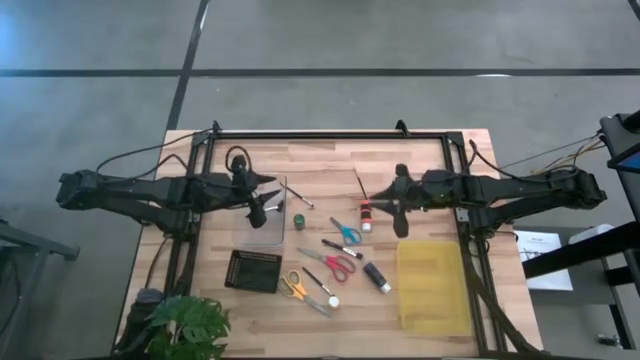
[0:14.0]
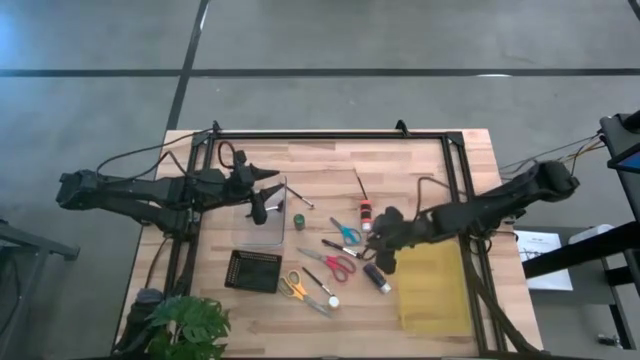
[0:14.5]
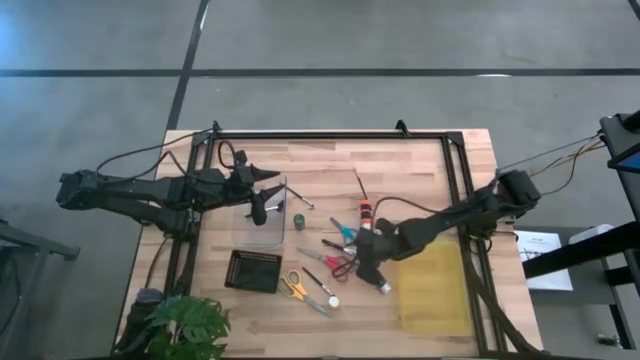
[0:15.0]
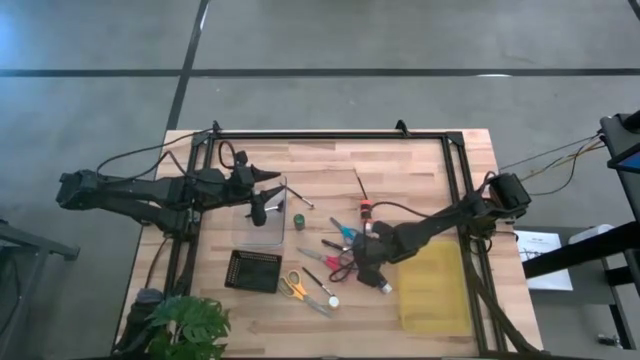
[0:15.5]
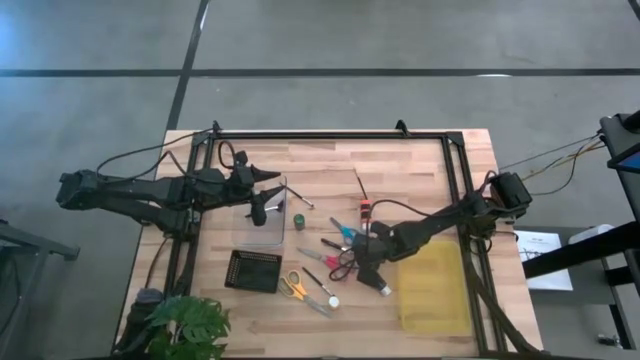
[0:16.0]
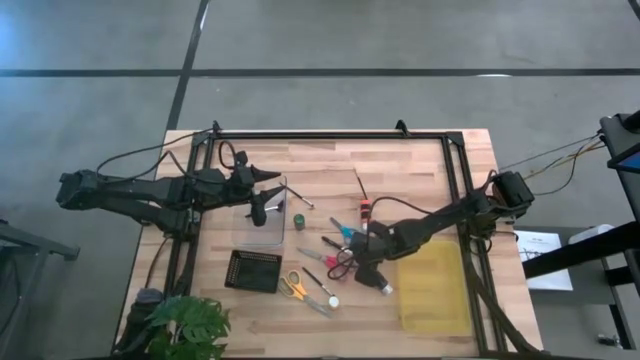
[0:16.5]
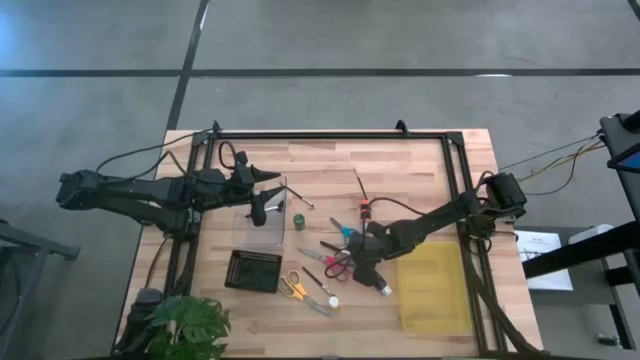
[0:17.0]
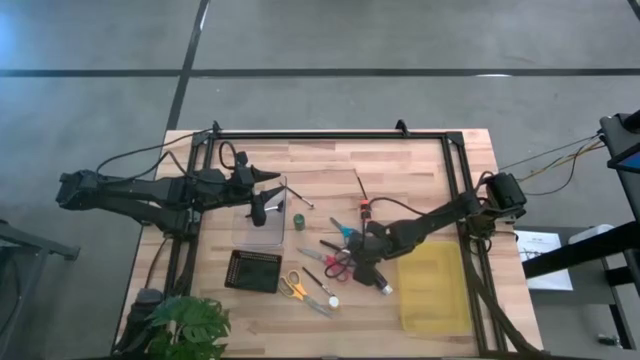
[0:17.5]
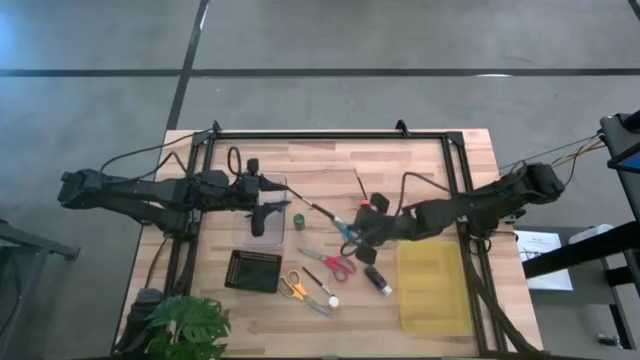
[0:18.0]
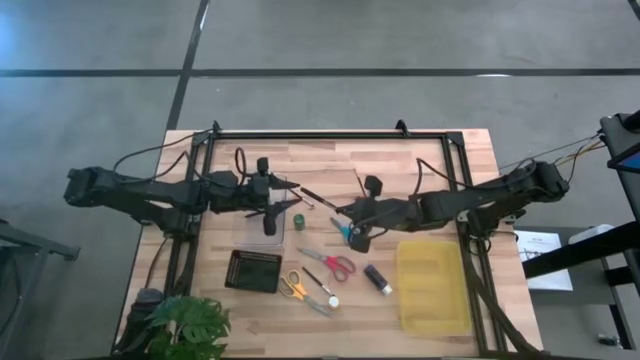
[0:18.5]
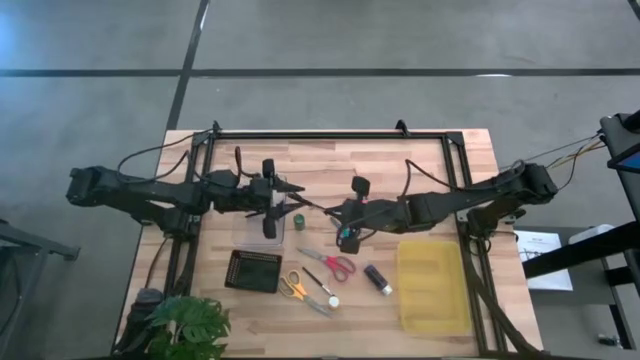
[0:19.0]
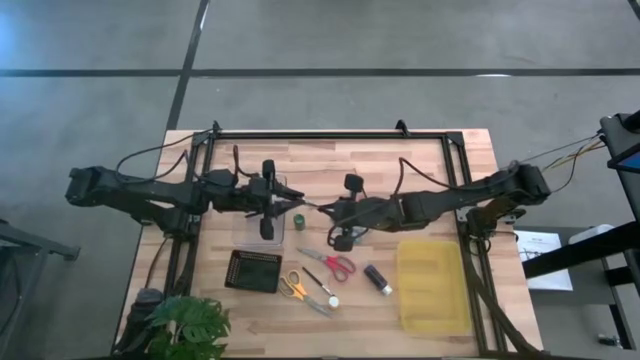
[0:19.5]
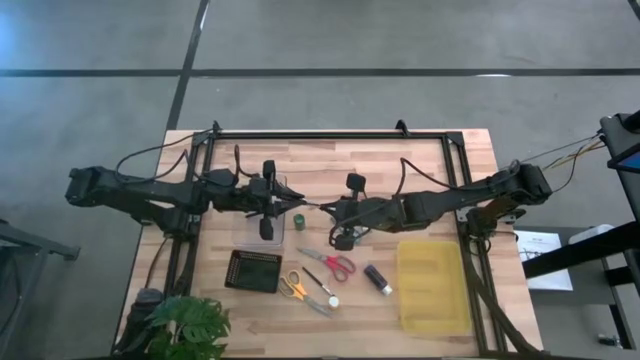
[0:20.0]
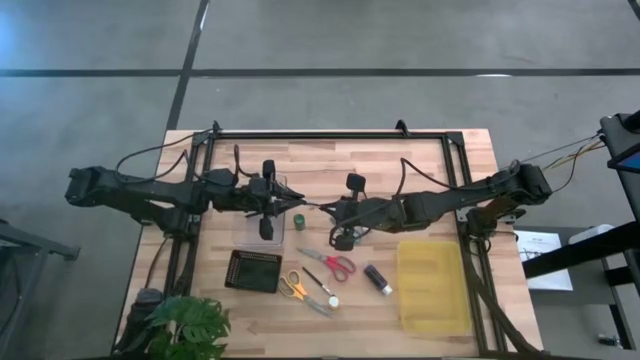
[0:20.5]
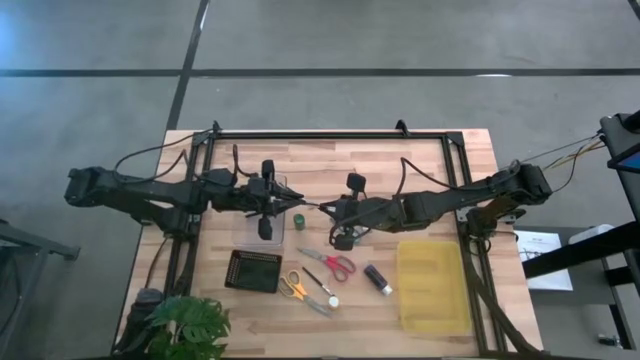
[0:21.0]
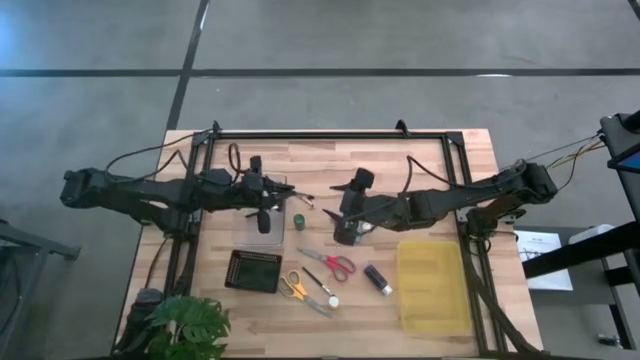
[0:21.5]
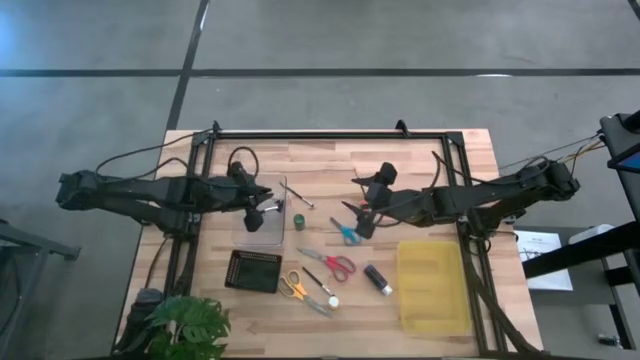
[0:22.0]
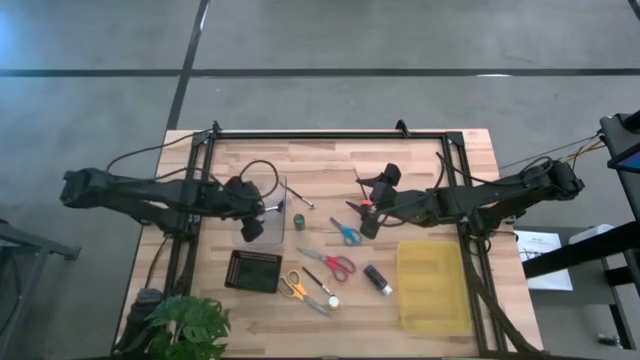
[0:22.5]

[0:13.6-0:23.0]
Task: Pick & Place Paint Supplies
Put the foundation brush into the transparent bin

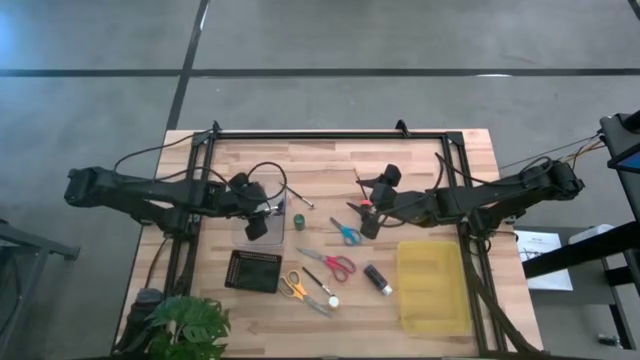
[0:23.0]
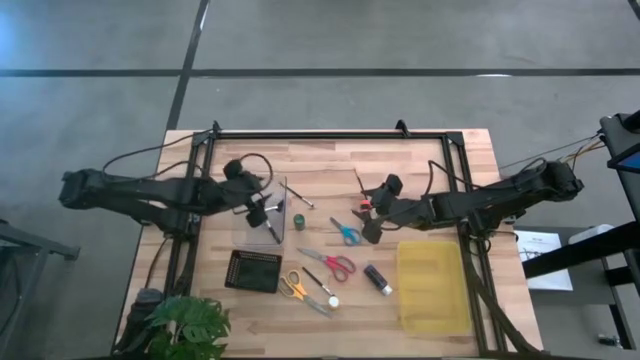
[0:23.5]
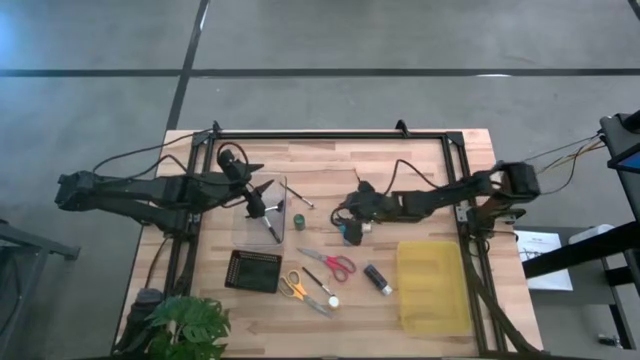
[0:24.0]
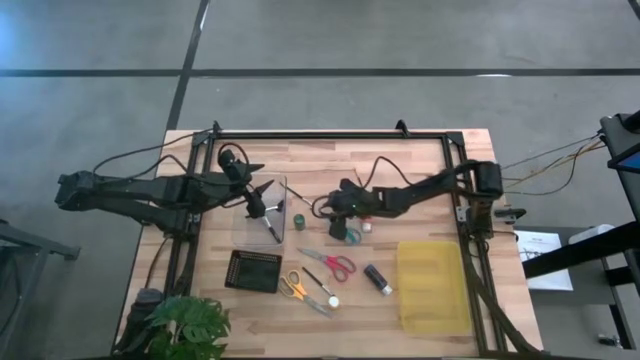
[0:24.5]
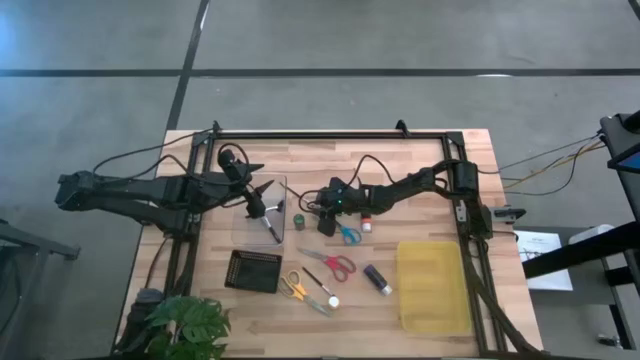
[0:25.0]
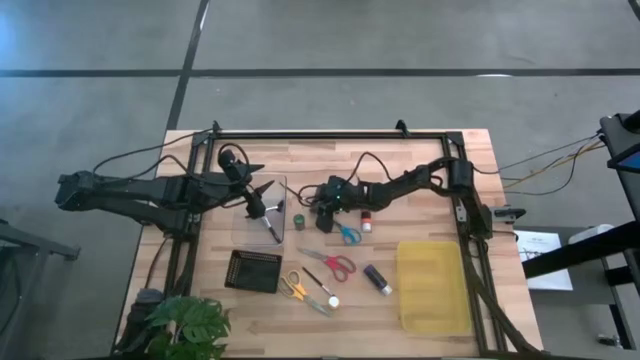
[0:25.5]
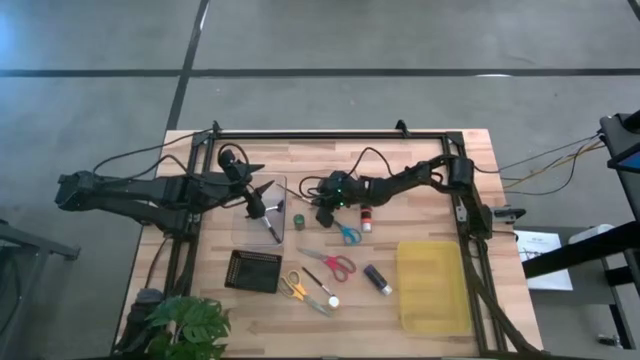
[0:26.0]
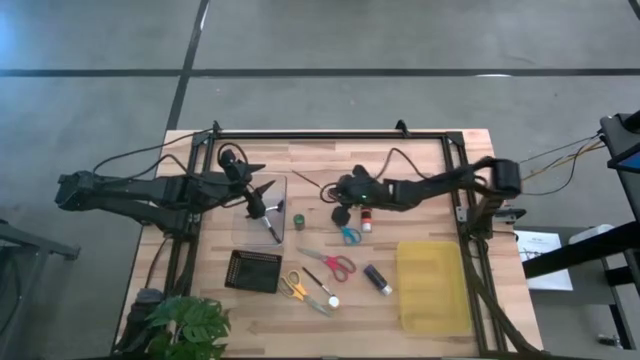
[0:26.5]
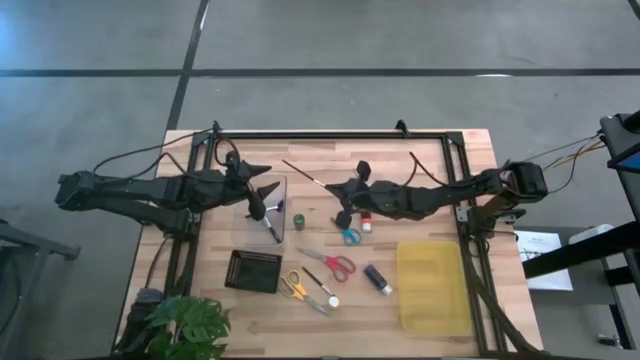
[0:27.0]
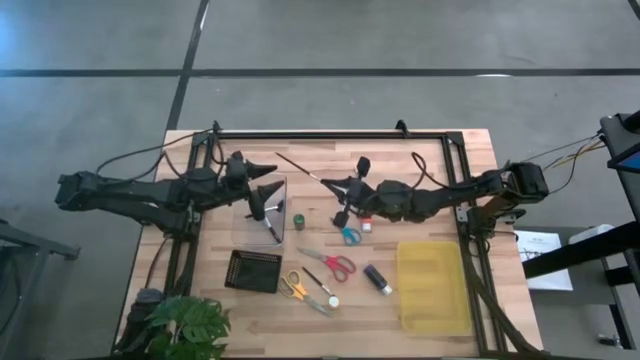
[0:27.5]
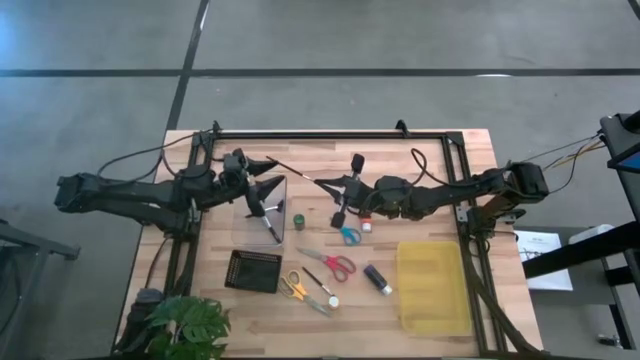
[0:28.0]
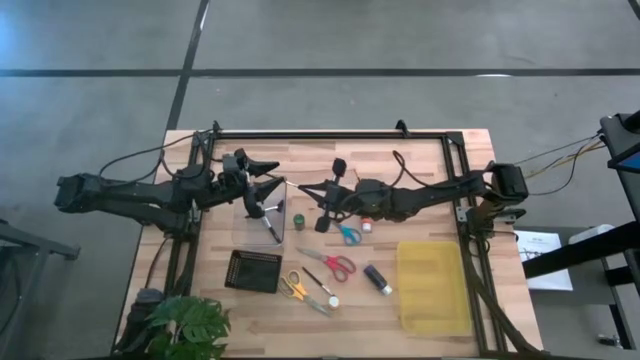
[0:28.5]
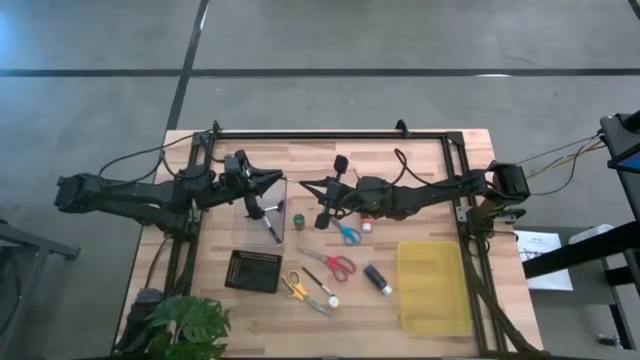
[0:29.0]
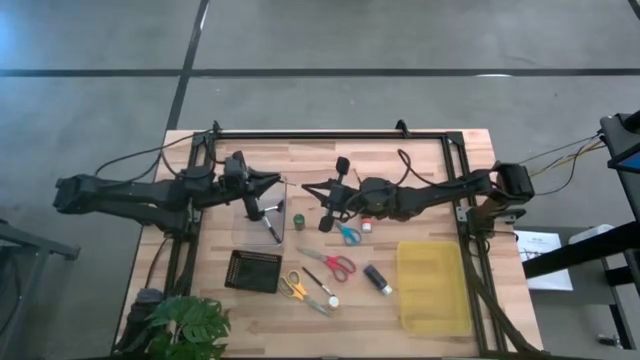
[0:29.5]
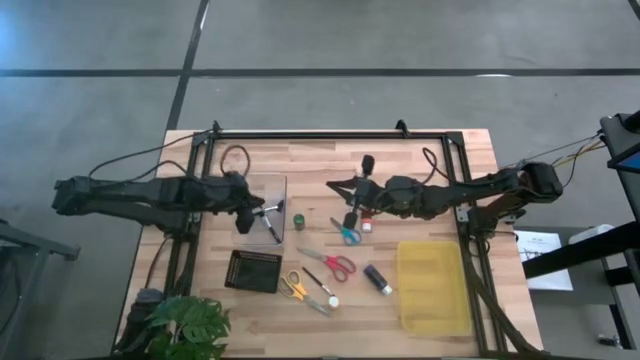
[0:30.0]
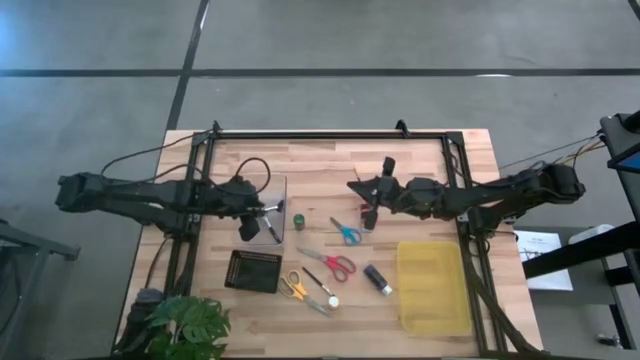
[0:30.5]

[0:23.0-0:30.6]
Put the eyeshadow brush into the transparent bin

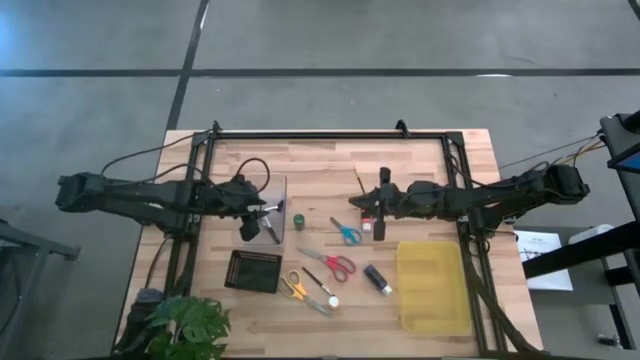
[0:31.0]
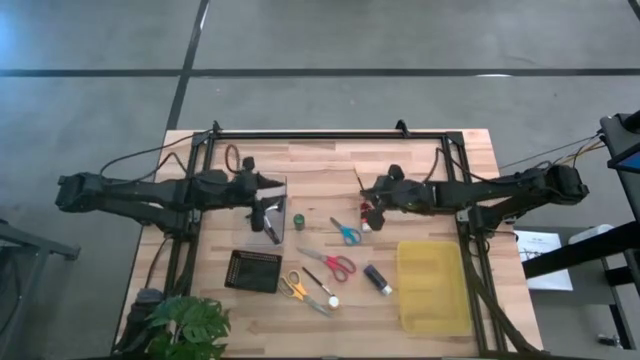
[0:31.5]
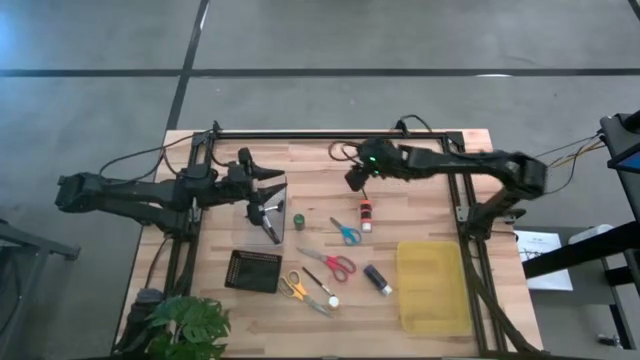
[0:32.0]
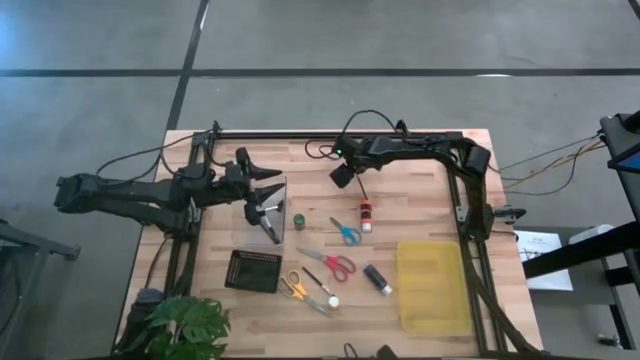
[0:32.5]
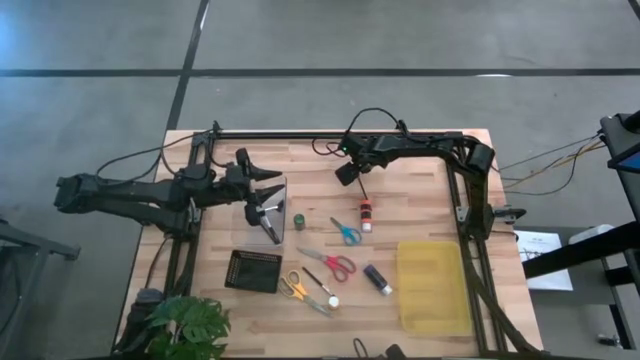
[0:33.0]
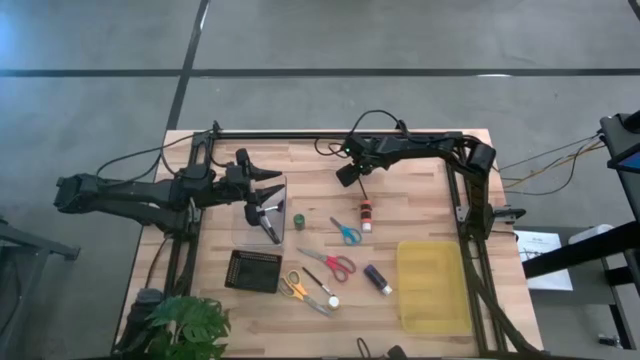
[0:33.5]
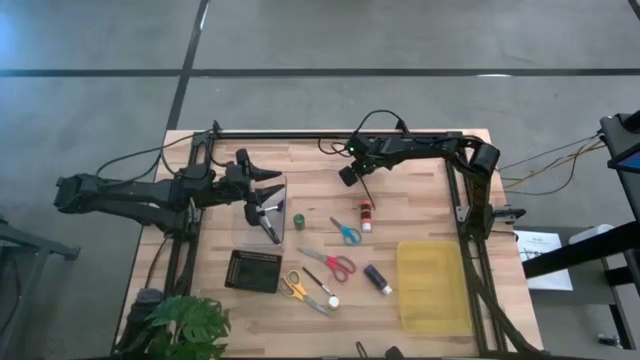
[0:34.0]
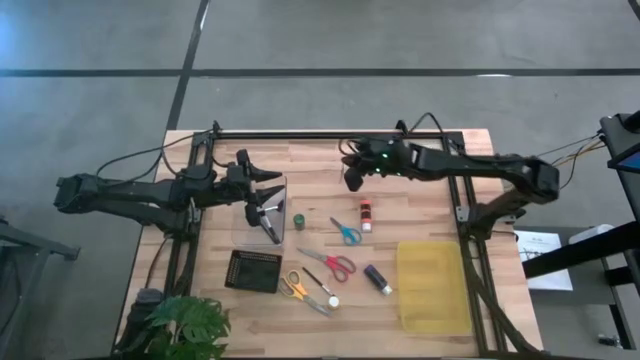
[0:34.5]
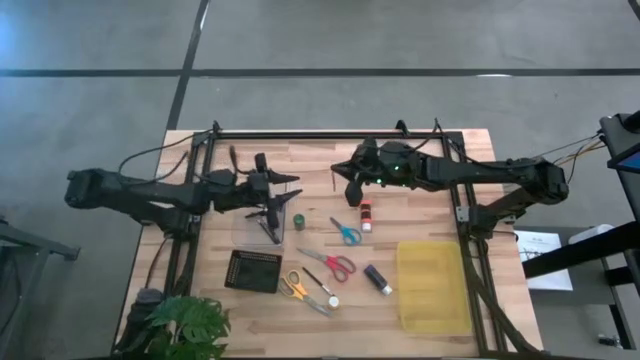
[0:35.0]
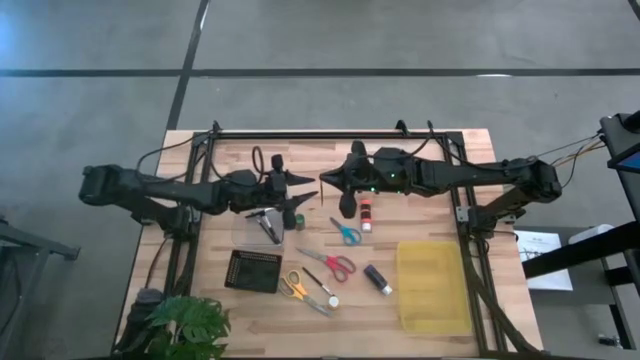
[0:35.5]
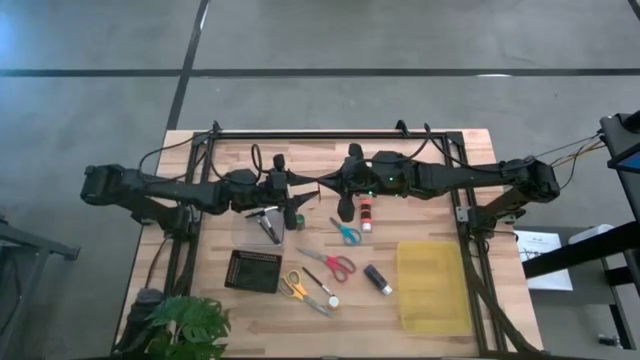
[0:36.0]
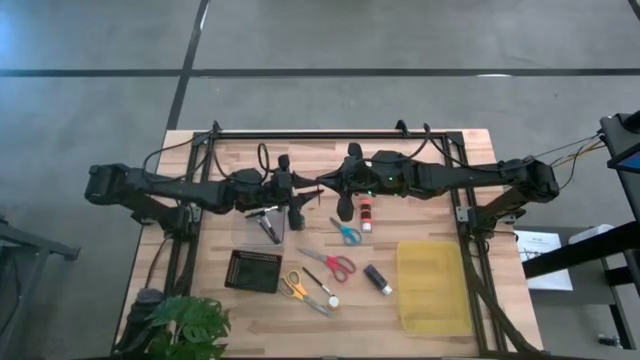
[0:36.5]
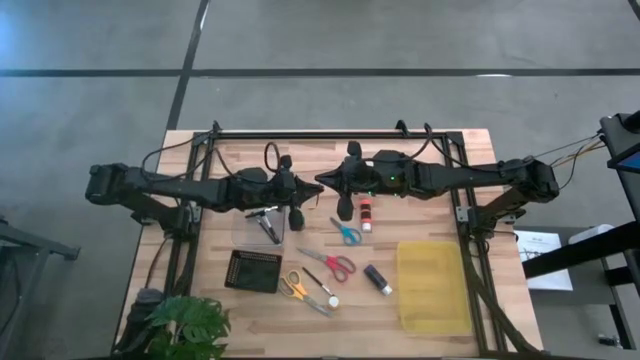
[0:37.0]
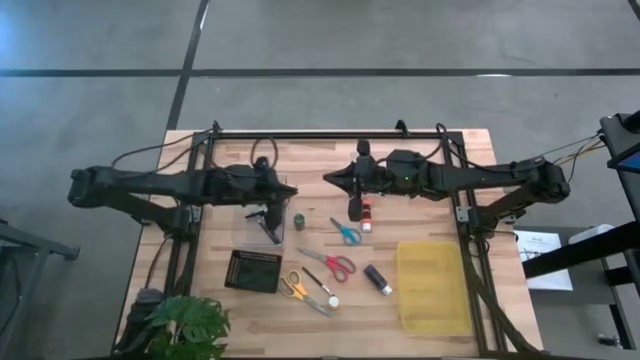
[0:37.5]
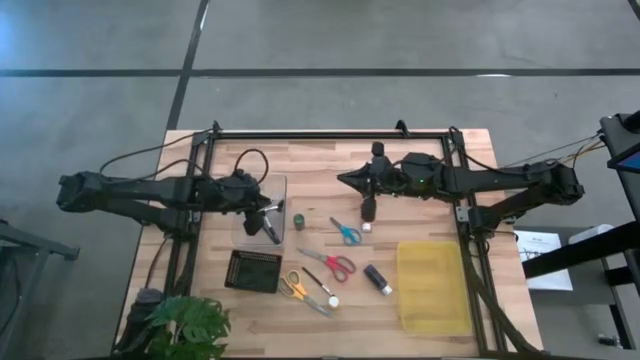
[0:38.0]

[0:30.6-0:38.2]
Put the liner brush into the transparent bin
